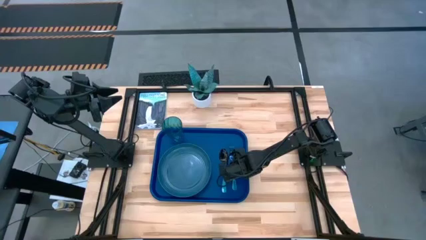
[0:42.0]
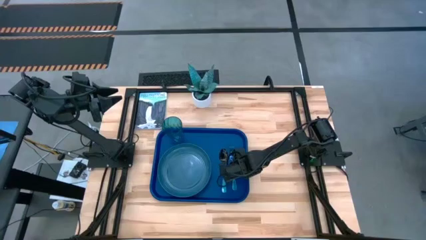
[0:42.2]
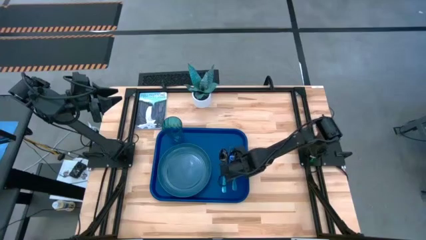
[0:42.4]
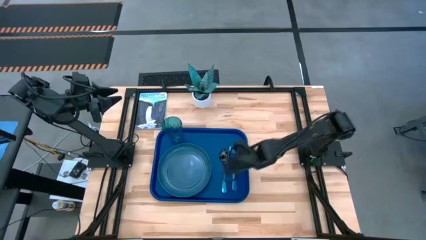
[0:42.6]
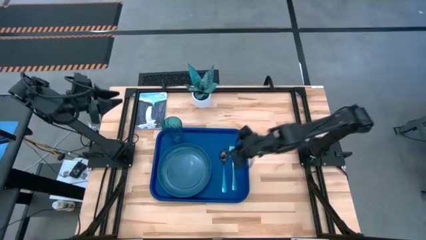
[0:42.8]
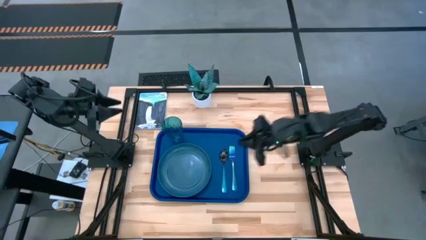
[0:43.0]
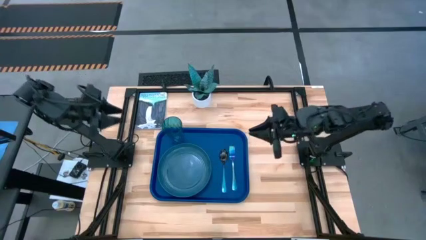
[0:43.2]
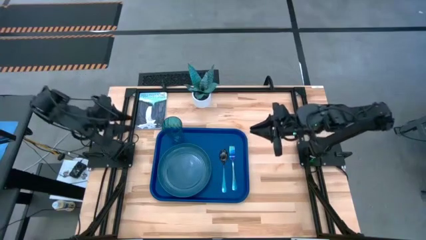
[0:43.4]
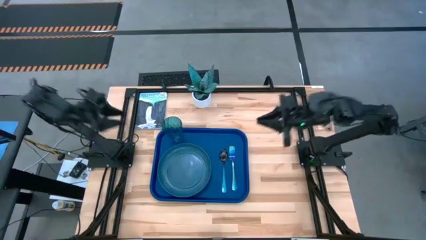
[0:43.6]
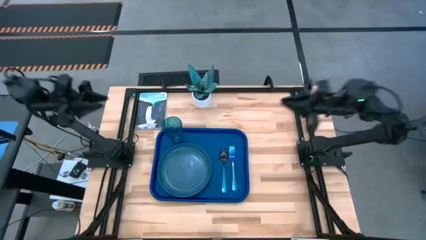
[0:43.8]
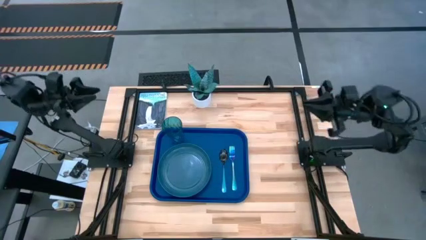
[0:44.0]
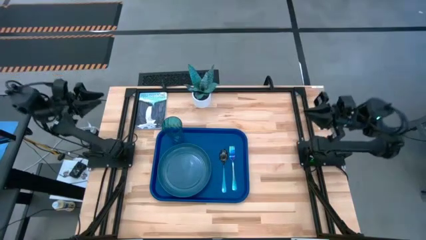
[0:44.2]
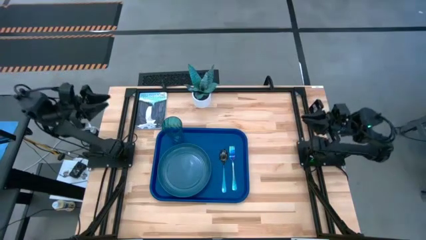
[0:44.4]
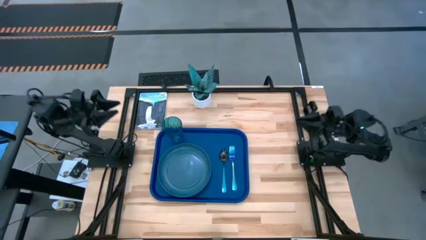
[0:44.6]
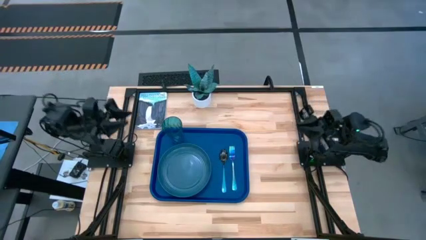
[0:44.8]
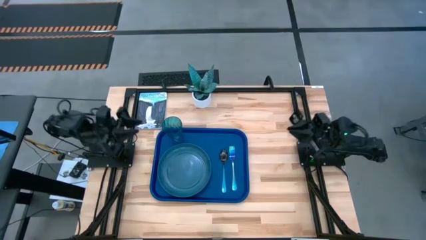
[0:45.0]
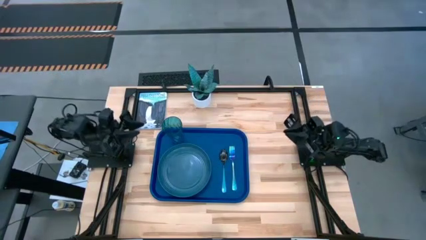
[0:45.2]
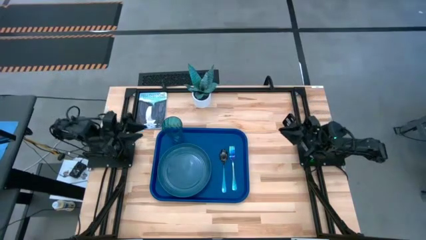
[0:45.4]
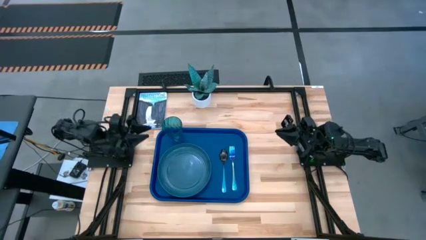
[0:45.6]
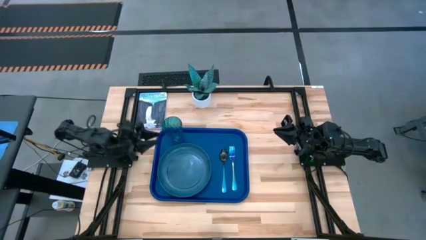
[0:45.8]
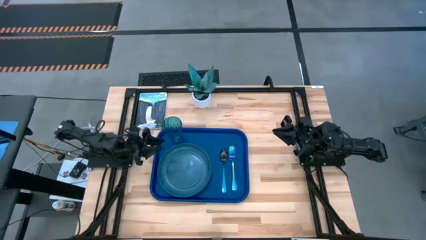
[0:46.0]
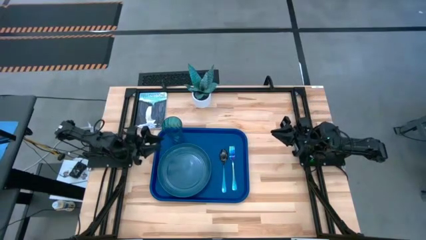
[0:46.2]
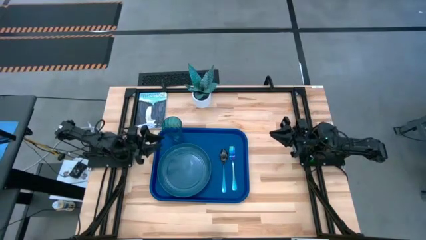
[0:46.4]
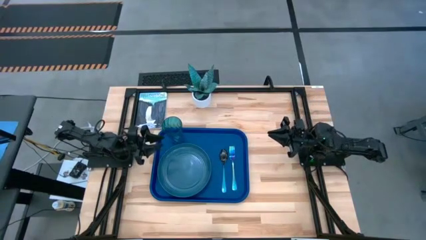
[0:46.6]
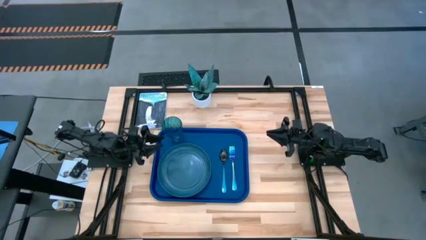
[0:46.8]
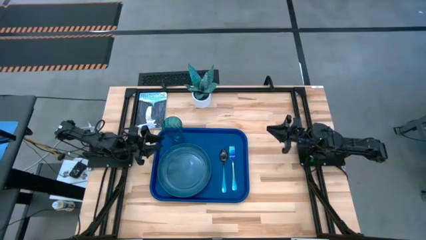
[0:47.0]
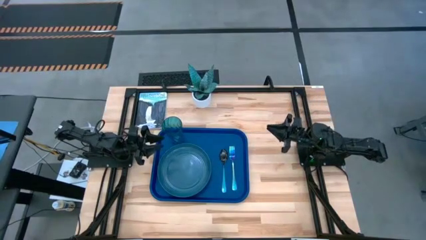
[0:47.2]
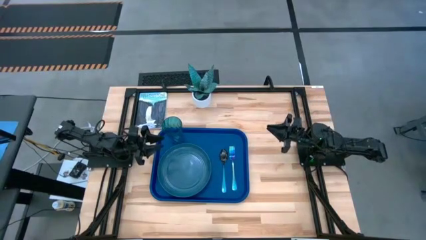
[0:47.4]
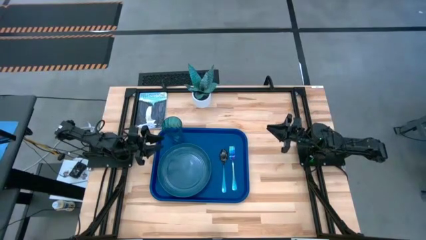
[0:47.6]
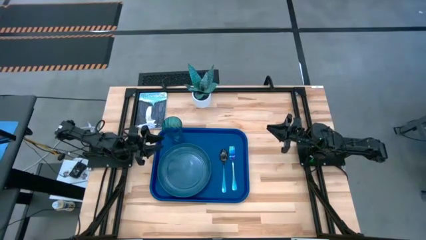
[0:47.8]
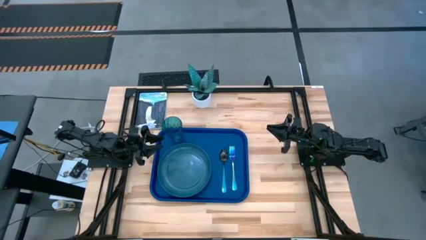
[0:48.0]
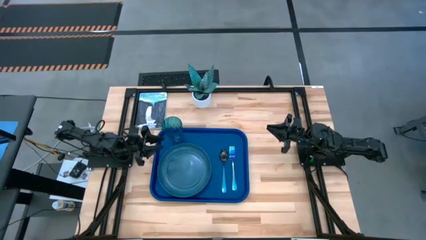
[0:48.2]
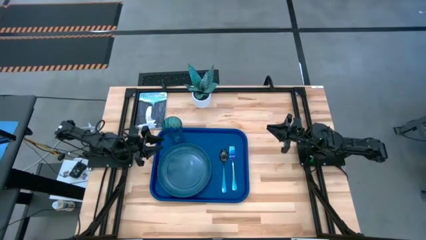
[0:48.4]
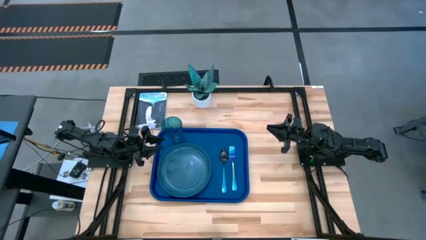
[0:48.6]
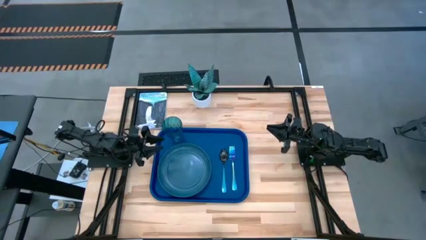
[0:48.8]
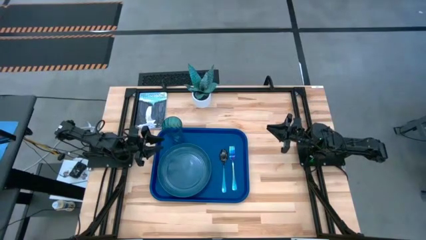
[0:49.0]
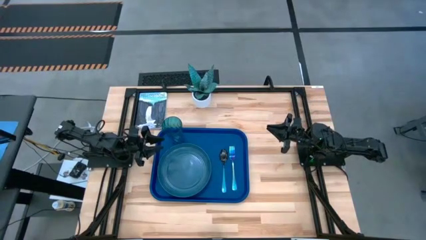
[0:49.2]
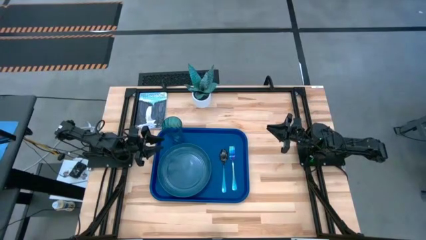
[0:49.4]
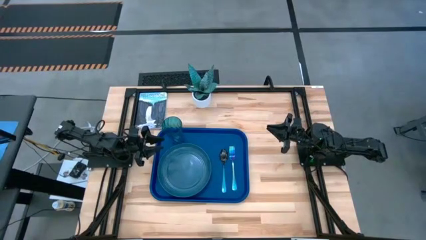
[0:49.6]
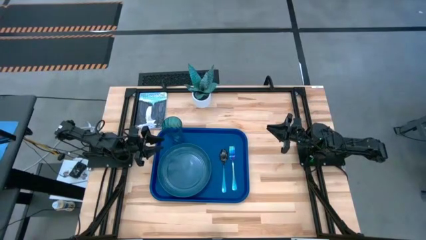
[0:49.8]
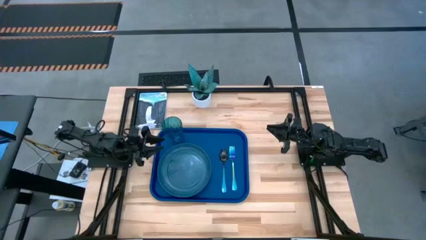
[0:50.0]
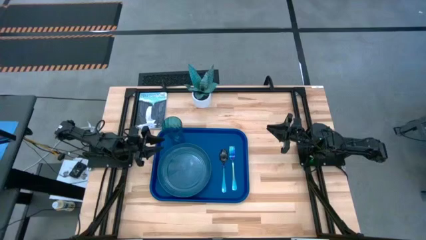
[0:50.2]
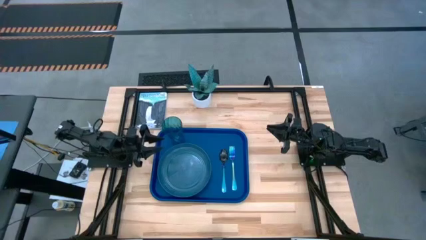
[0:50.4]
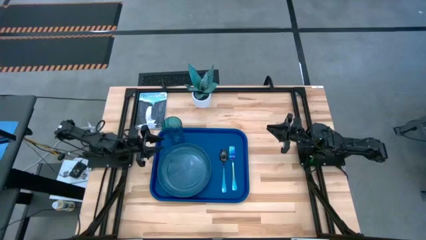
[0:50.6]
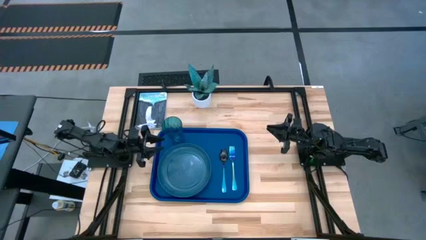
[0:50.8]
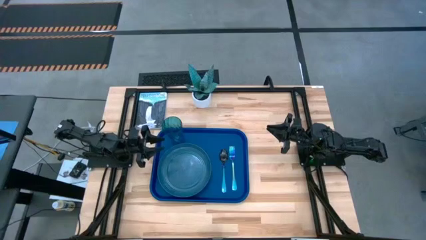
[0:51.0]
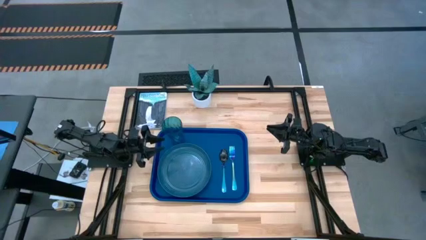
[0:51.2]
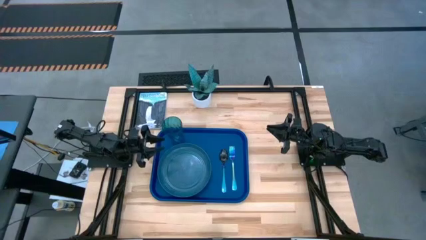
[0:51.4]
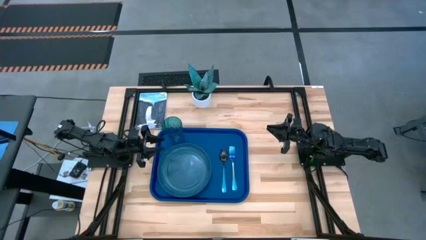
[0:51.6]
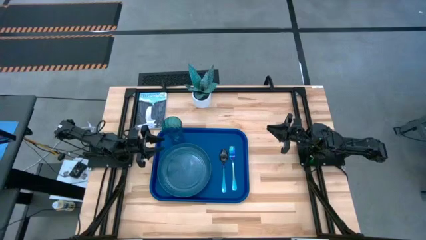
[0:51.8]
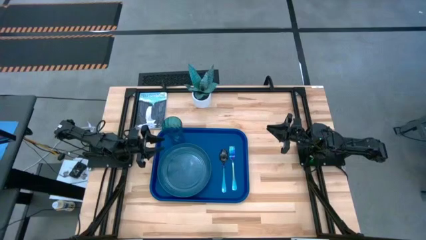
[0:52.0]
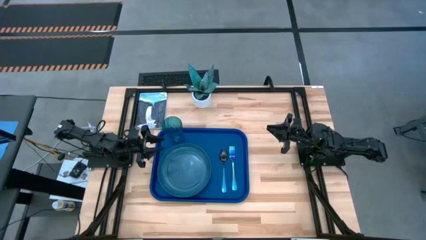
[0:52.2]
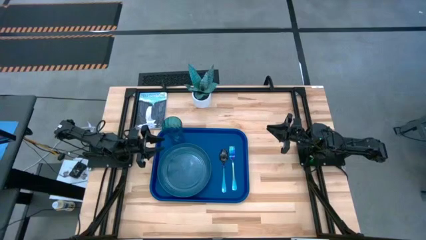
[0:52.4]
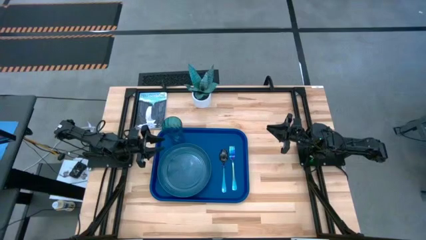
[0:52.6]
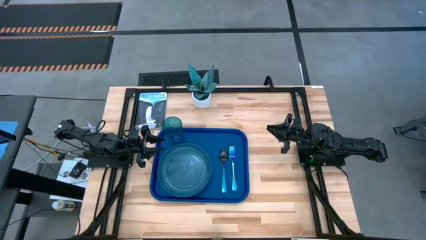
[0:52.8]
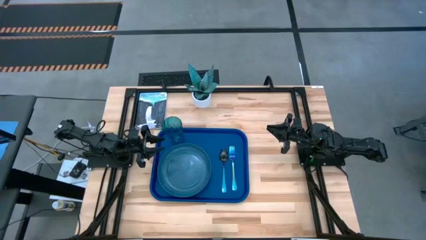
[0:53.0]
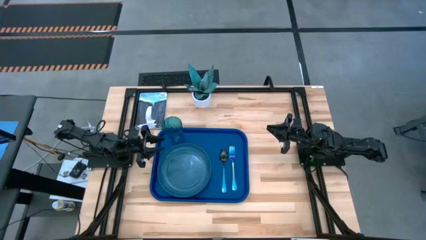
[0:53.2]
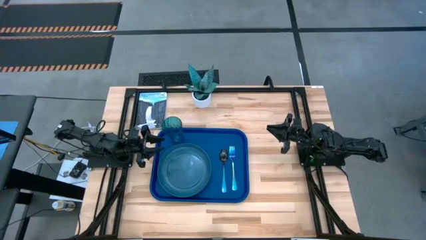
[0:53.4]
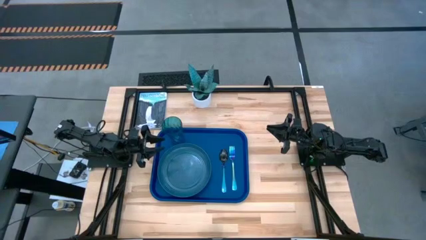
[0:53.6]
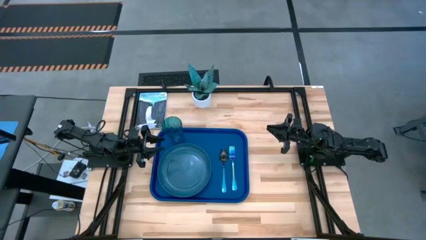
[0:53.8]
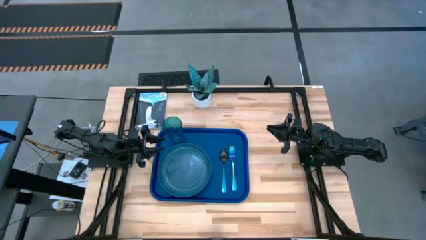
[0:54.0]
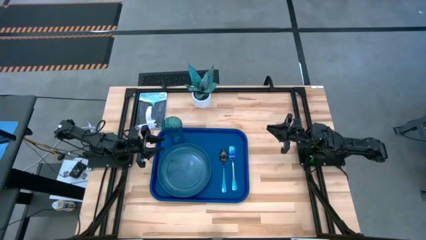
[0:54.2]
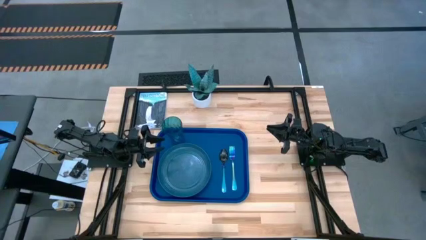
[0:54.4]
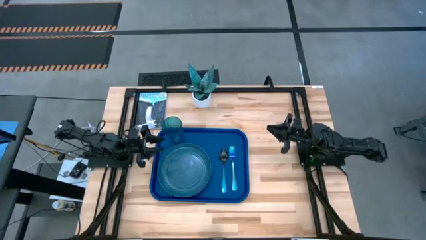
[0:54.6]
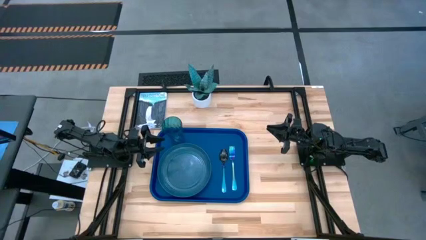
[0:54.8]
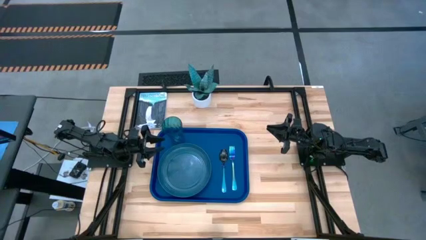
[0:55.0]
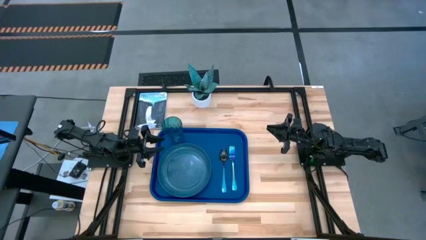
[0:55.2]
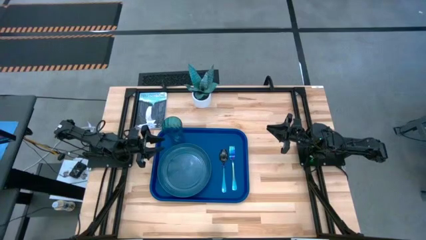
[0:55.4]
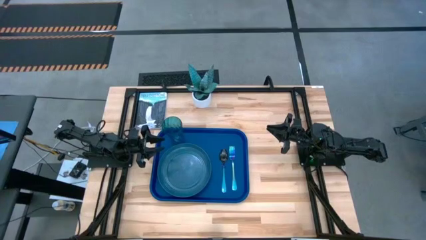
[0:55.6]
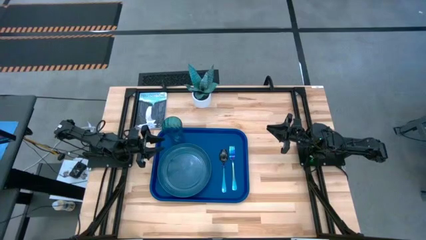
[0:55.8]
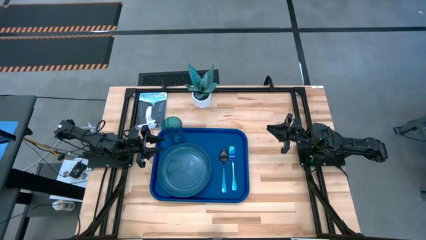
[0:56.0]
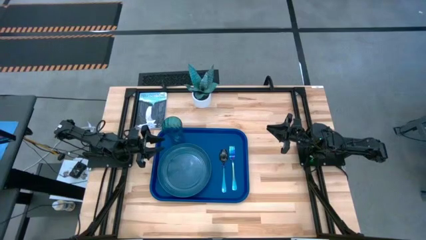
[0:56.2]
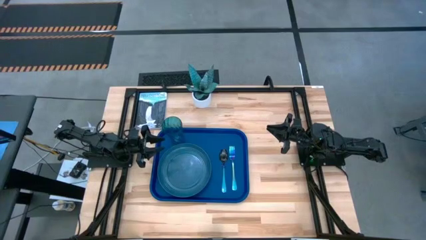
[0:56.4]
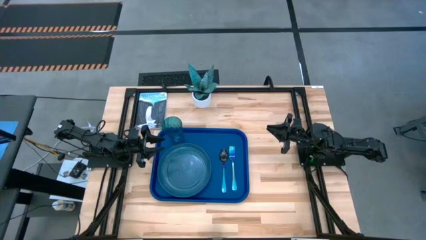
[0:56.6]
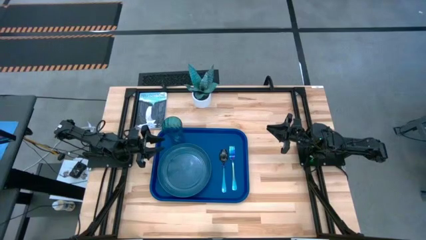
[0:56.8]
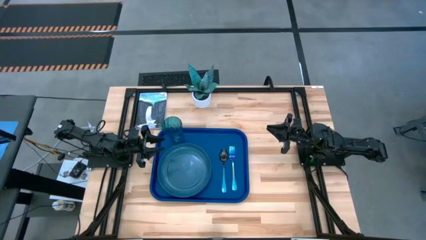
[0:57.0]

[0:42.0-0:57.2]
Task: Pick and place plate/cup/fork/spoon on tray
Return to Home Position
